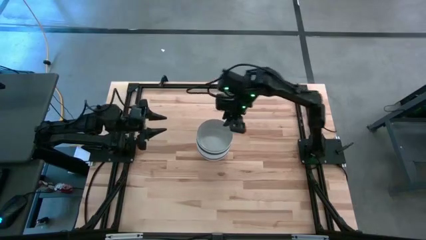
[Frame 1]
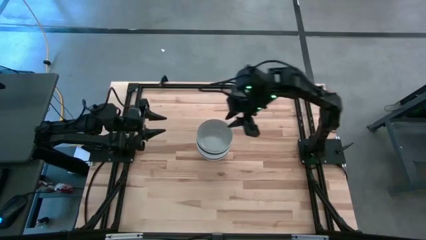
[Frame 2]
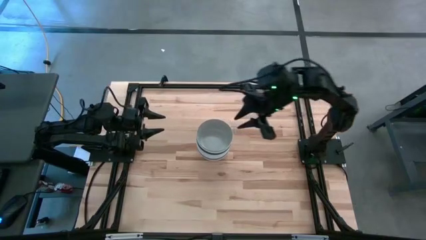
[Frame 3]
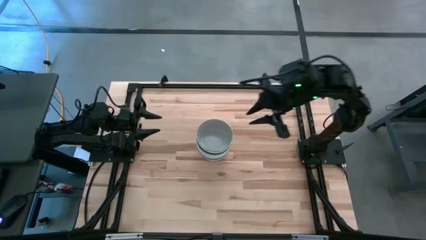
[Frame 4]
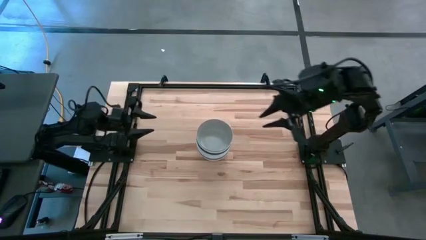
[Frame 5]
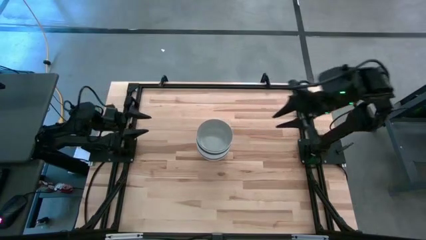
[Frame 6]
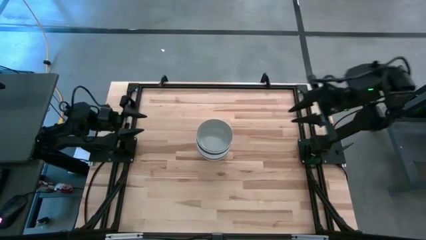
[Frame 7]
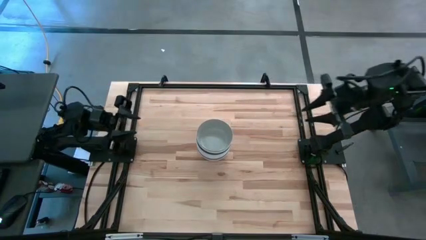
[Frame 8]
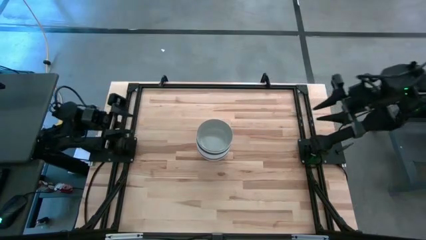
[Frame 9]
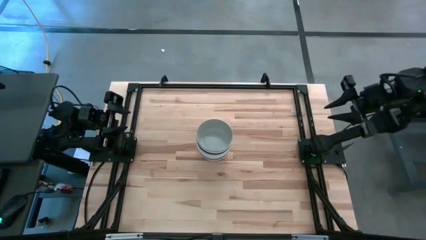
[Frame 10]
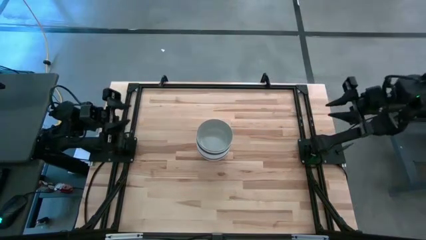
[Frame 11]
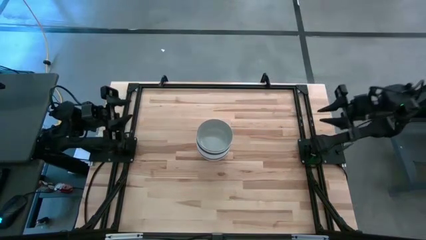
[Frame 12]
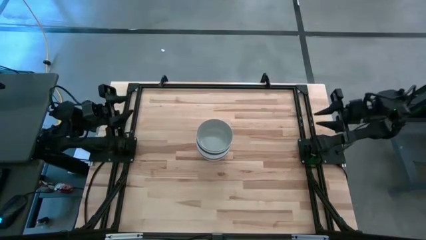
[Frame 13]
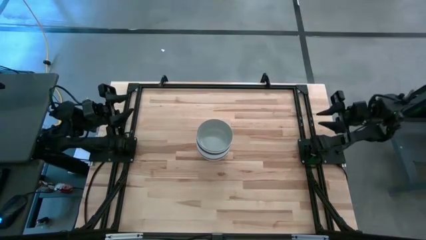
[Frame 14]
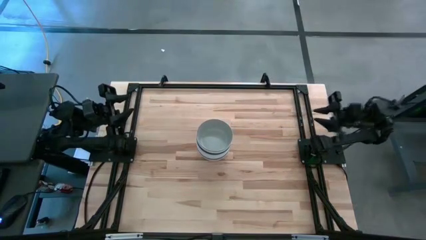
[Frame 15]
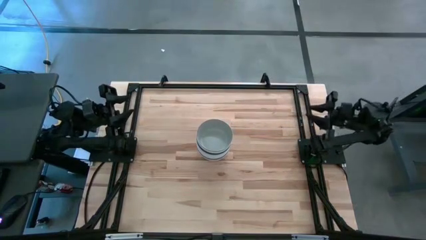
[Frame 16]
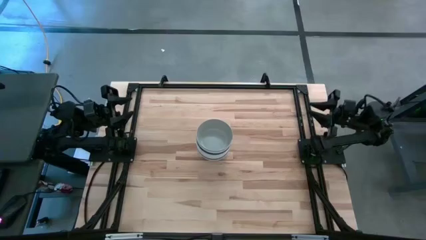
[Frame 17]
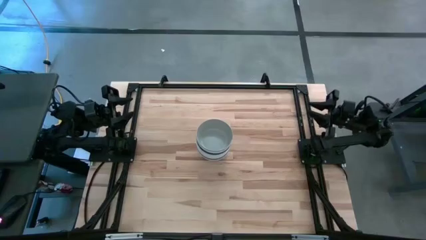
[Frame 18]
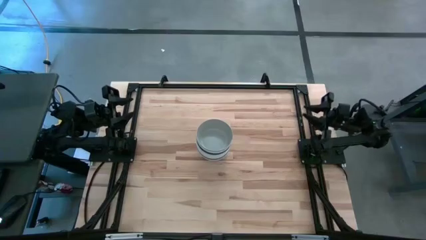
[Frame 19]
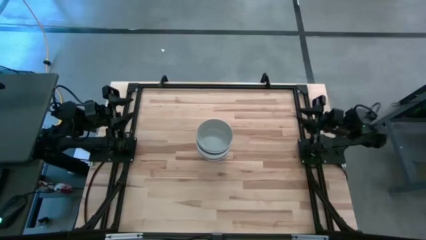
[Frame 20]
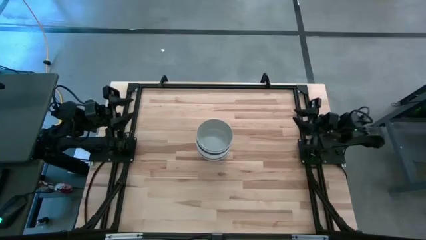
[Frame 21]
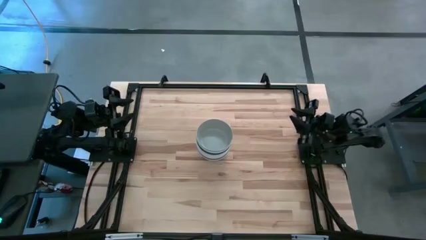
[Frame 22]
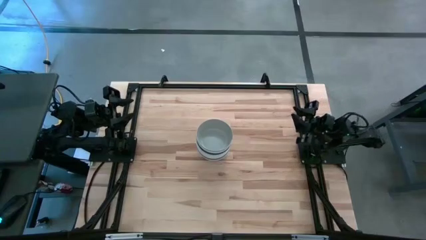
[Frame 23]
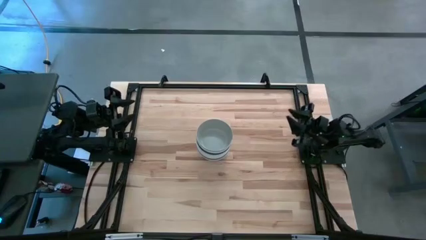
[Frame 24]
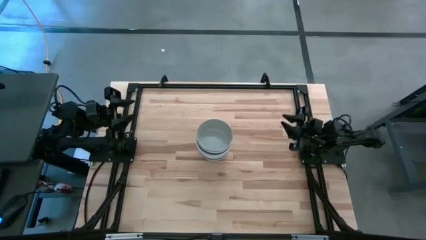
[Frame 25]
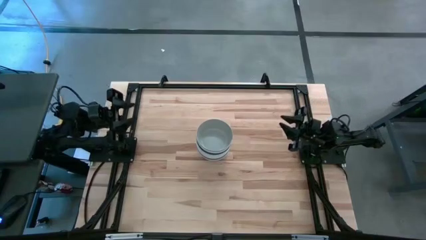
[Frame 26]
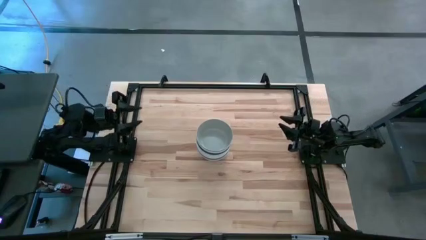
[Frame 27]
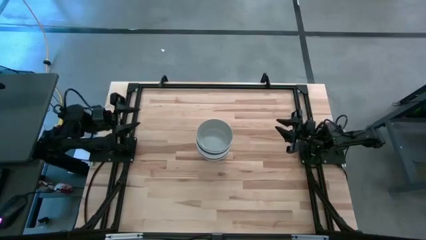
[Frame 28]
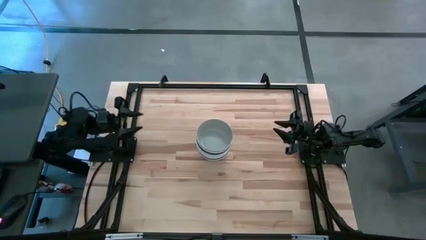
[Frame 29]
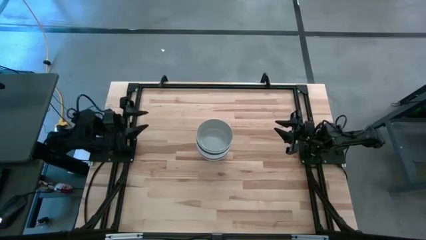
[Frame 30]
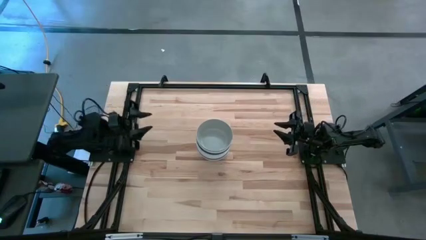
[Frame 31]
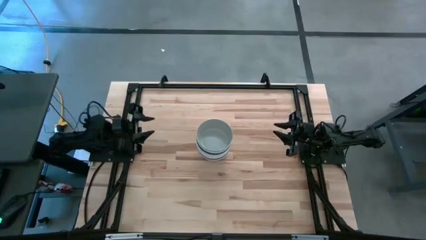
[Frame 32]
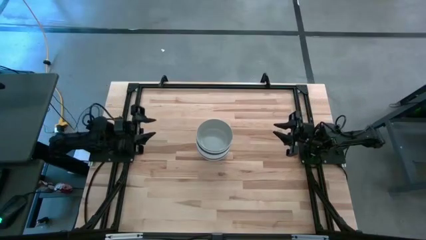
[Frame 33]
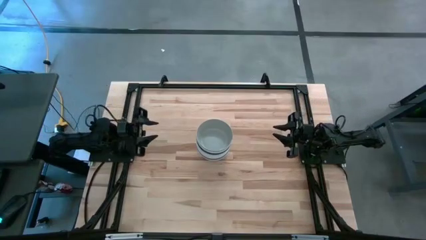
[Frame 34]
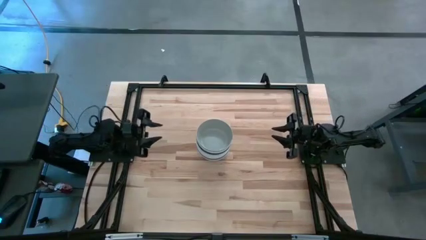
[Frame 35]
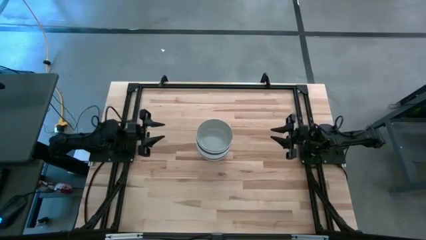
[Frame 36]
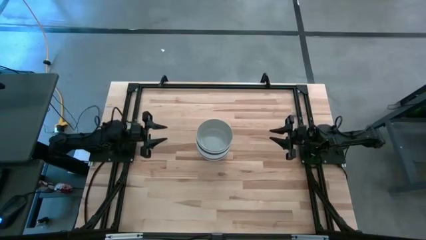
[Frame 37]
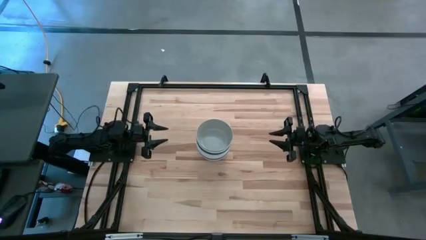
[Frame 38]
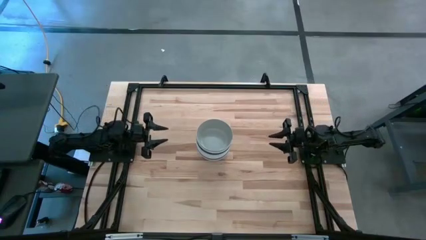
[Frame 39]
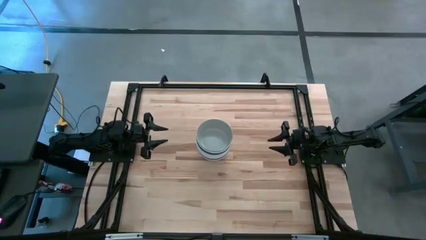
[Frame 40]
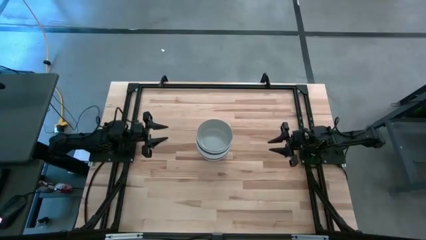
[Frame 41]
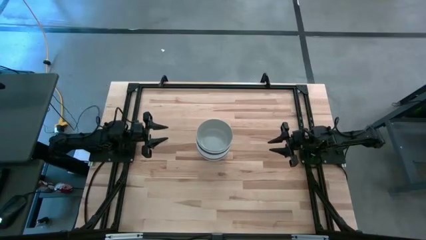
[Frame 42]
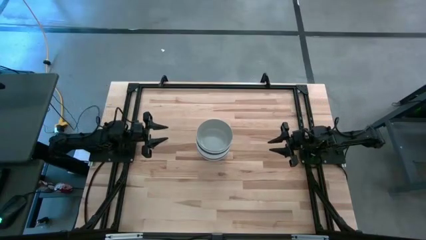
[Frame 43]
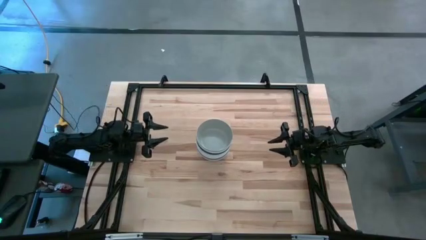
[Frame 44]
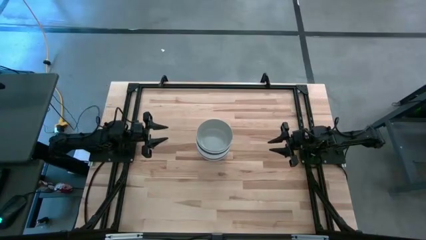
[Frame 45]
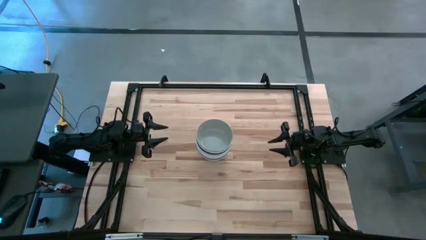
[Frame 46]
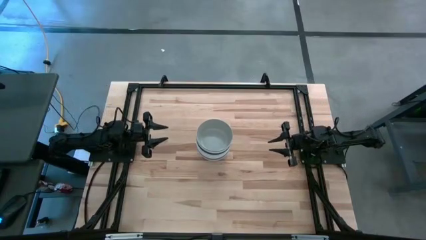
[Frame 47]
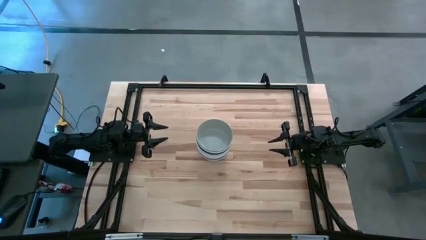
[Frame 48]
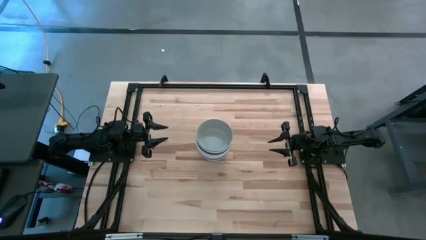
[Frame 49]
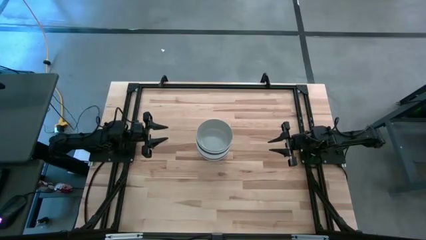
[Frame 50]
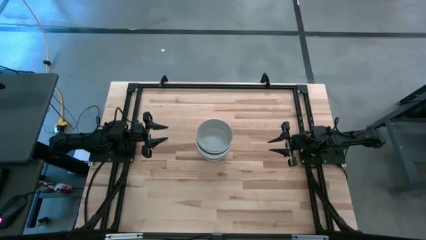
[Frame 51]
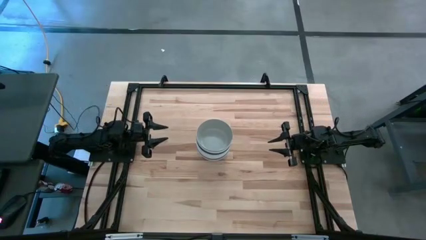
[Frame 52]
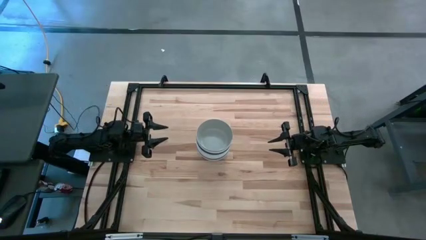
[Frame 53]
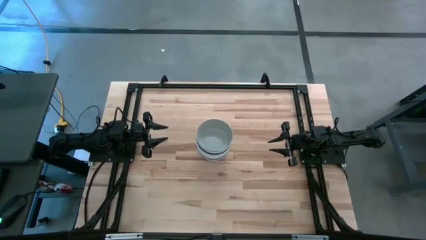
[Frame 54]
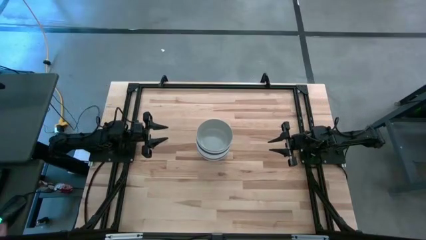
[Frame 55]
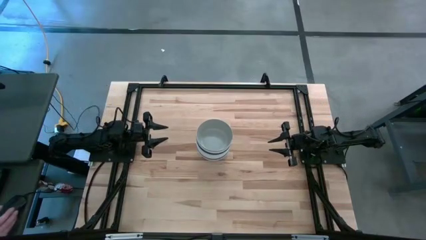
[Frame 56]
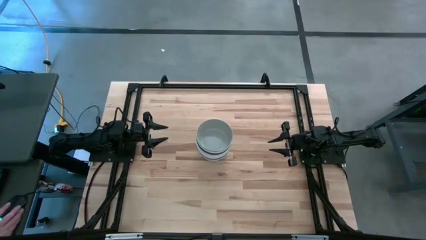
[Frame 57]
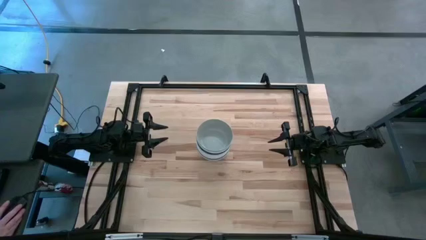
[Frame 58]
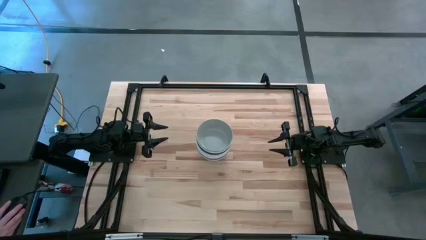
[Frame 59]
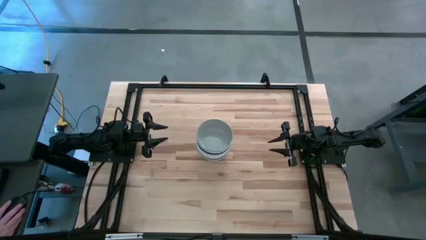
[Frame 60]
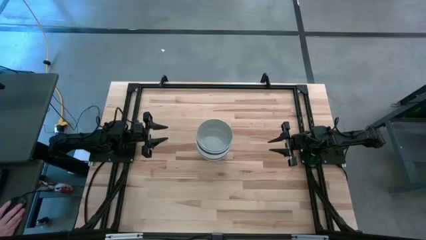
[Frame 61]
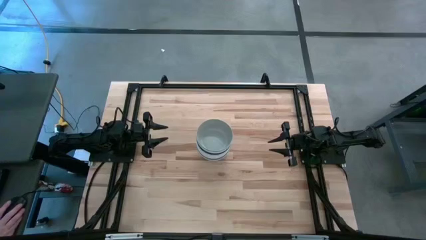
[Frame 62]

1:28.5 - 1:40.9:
Task: Nest bowls inside each other
Return to Home Position
